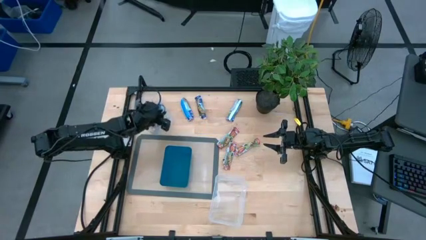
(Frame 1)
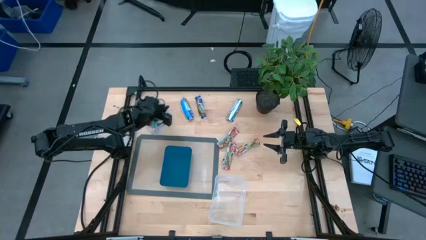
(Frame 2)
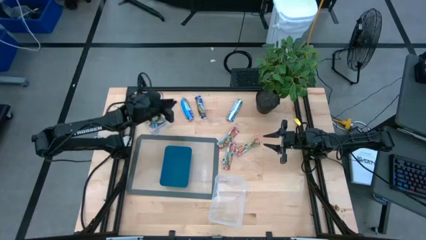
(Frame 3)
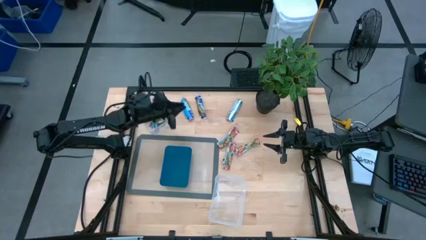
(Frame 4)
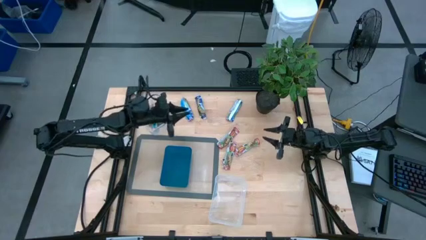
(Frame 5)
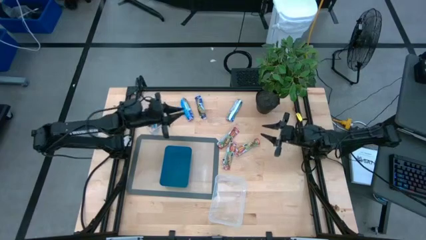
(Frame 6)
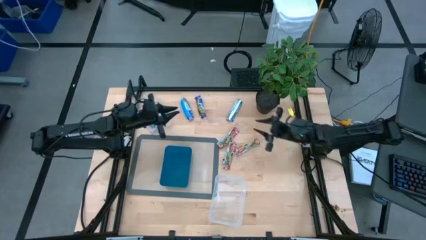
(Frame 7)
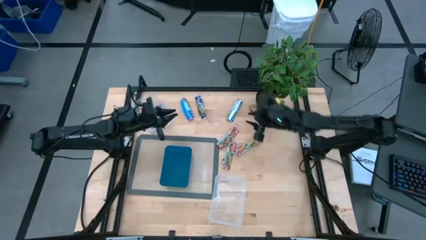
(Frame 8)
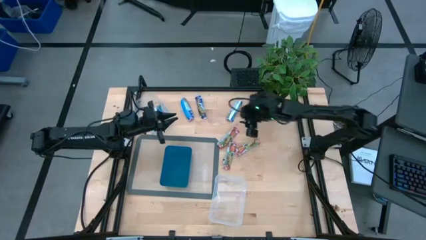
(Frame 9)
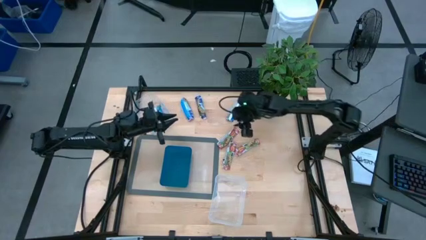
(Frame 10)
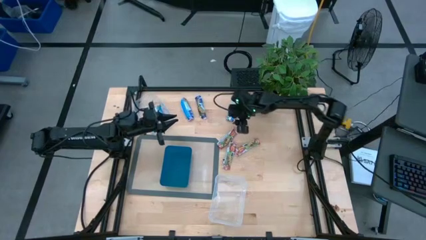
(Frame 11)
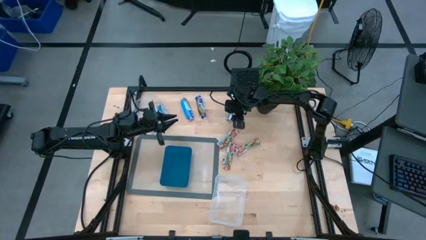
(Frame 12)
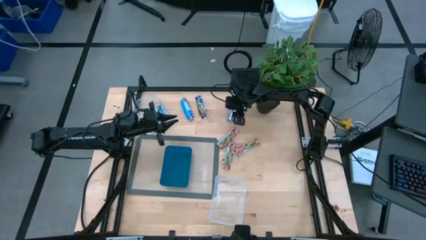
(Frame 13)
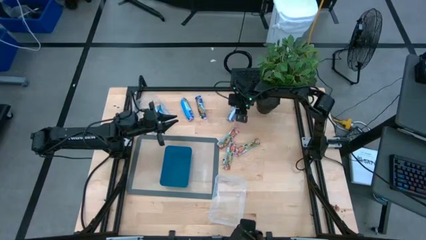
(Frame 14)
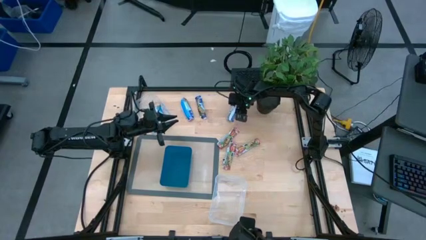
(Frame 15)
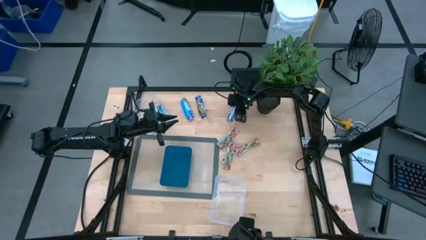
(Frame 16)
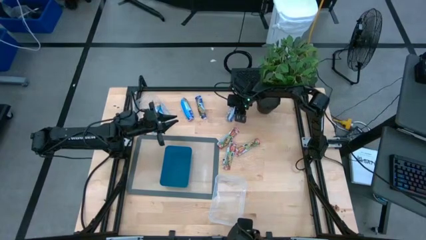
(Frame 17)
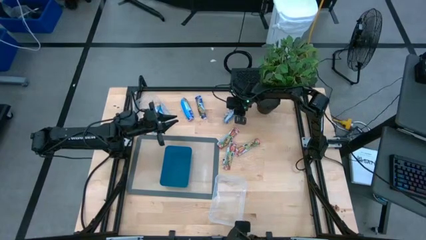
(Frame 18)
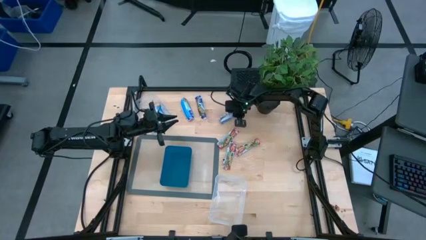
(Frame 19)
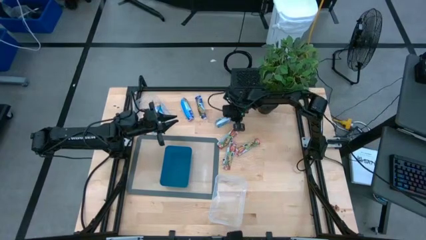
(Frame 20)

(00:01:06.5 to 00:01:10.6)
Task: Pick and place Granola Bars by type
Put the blue granola bar into the blue bin

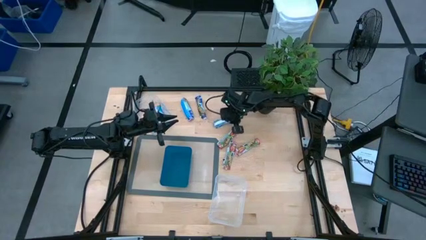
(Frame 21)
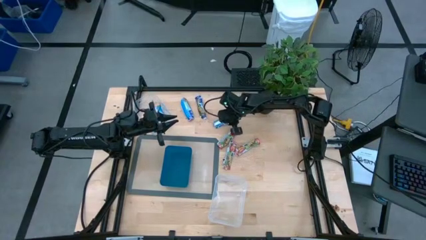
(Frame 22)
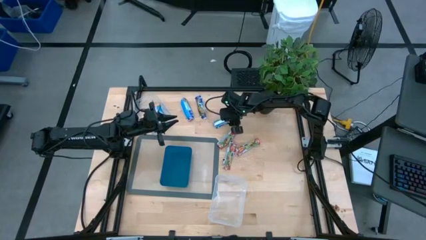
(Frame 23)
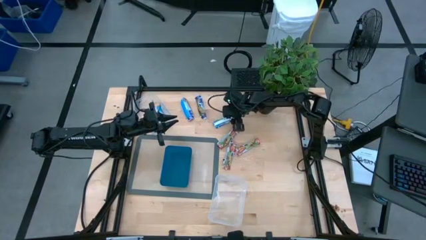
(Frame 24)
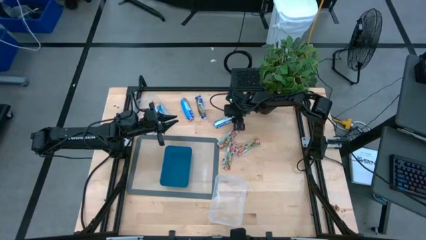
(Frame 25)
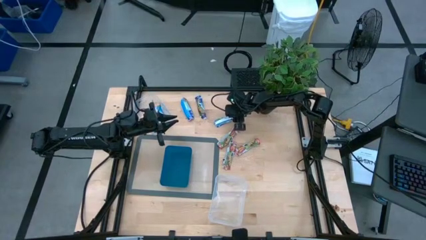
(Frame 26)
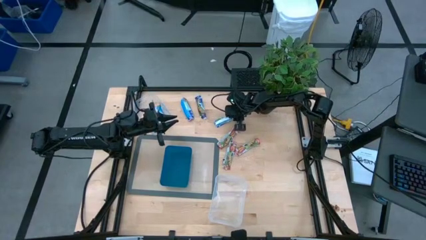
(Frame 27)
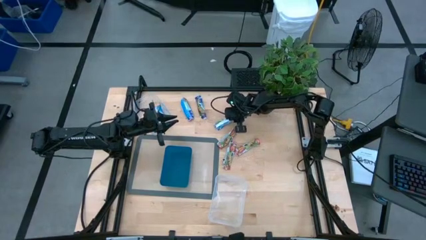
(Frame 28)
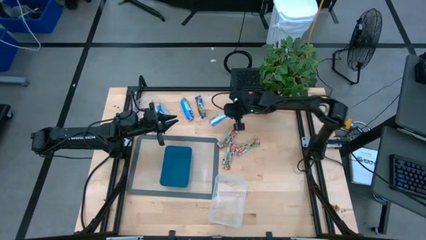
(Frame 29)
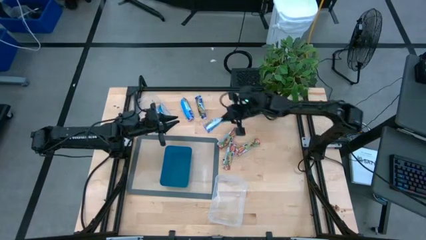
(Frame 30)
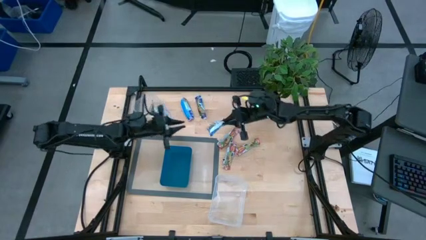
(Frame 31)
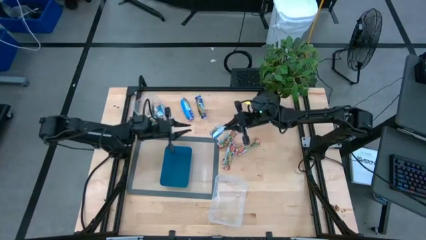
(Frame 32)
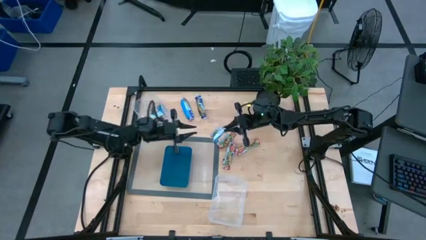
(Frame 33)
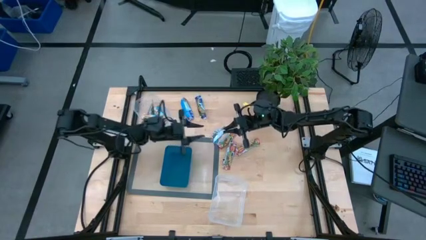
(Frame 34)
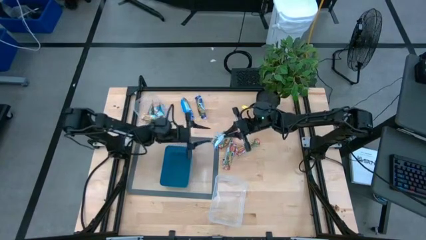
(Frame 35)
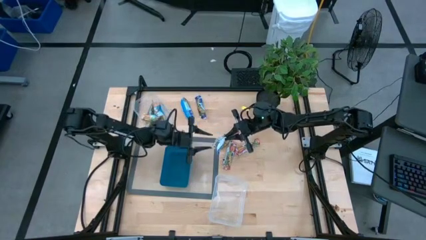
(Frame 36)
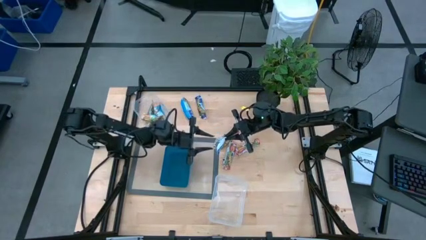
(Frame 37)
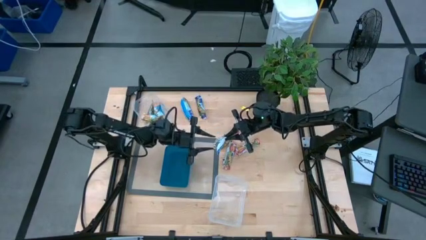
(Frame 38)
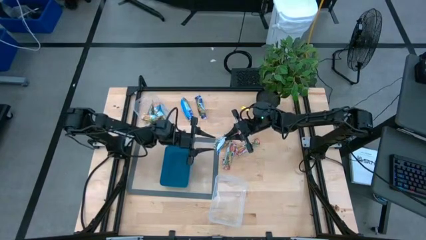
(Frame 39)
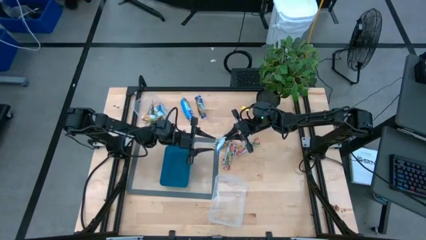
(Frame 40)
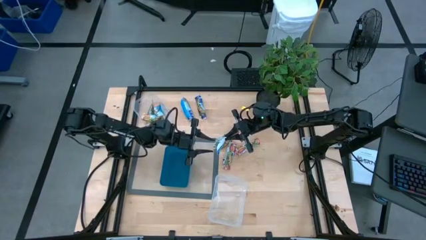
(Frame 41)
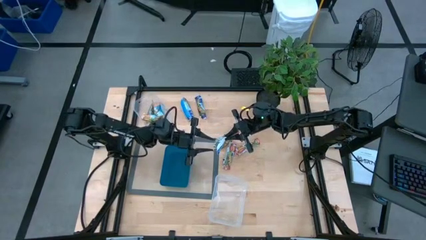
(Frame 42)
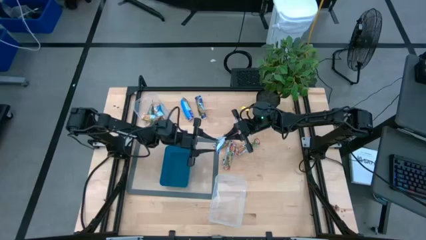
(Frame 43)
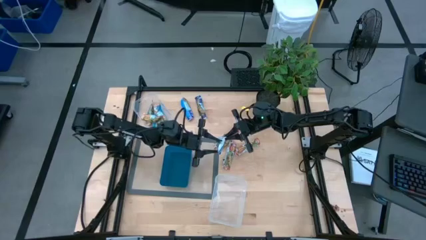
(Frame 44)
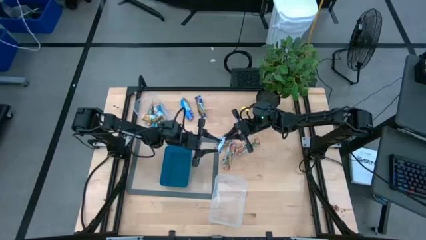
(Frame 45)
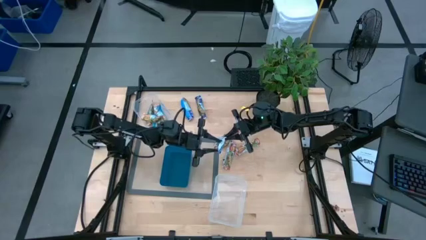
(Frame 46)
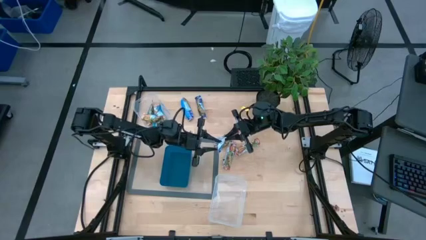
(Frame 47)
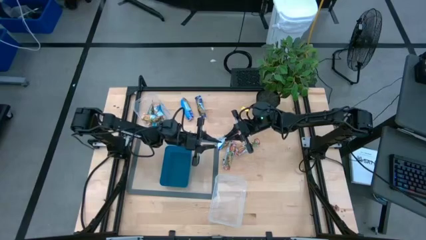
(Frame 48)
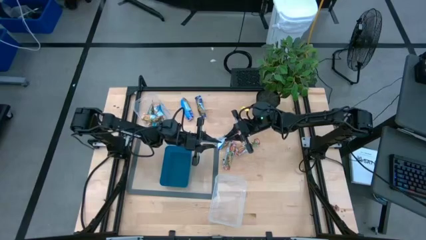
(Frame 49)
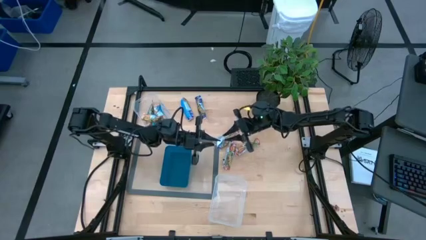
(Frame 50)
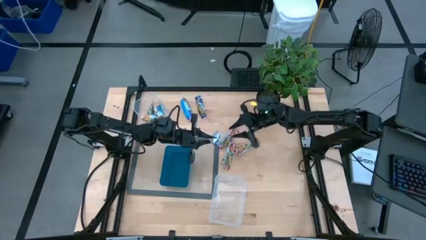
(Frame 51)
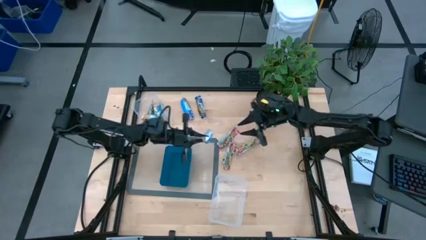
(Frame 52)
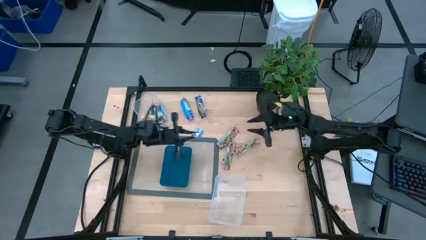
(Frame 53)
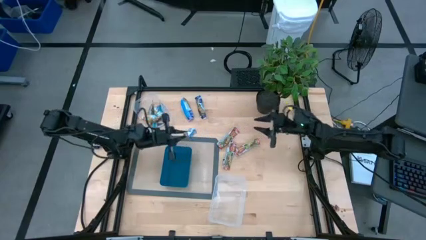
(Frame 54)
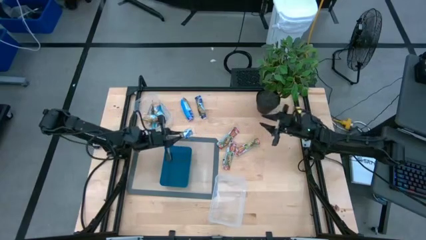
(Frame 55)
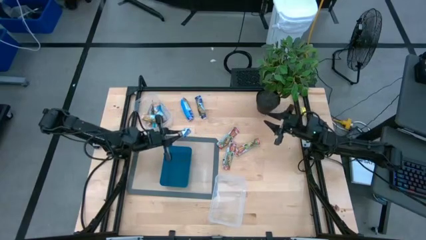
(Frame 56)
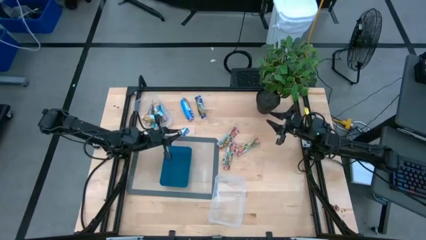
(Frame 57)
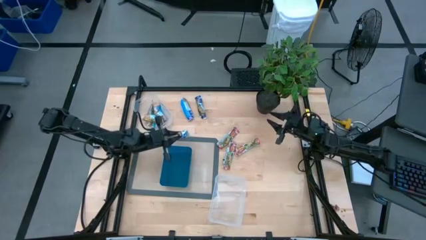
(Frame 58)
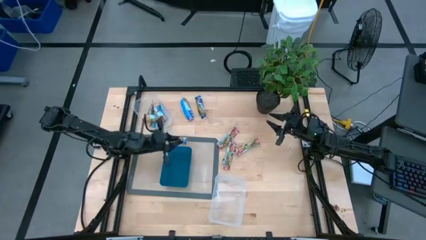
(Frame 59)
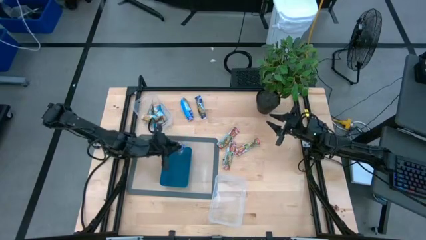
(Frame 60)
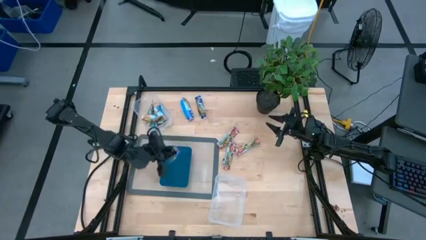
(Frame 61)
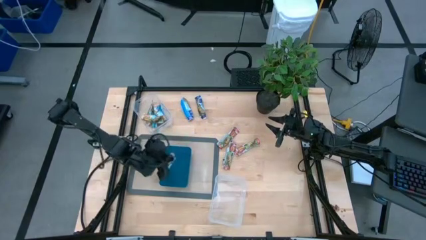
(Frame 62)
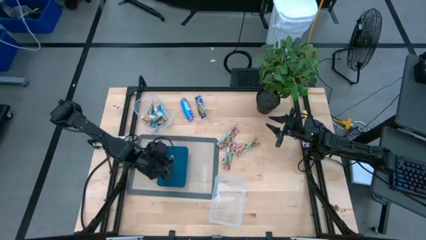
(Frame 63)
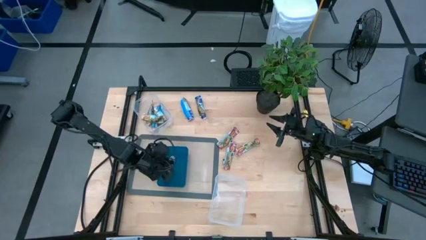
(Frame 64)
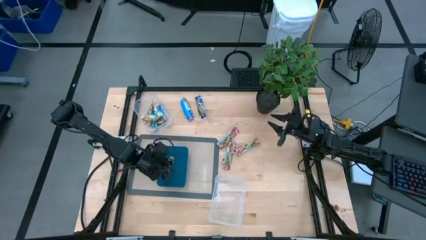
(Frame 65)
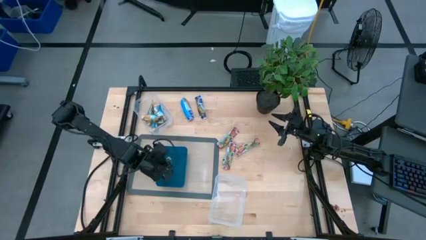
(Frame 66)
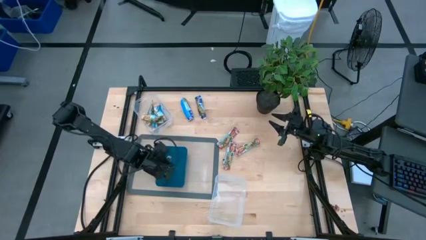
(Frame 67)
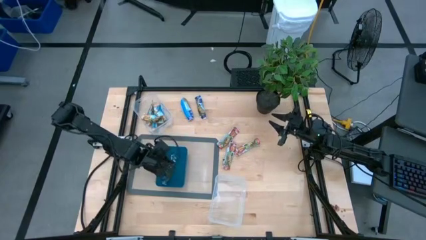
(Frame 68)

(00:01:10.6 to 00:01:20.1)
Put the bottom blue granola bar into the blue bin
